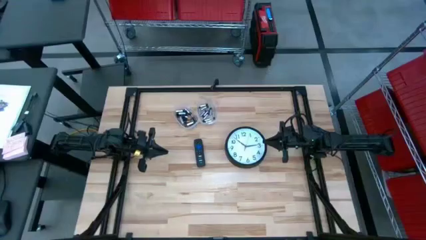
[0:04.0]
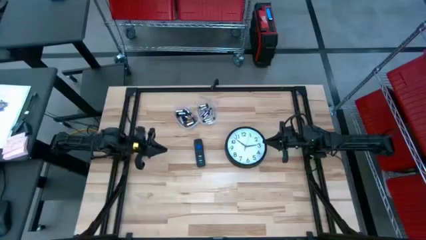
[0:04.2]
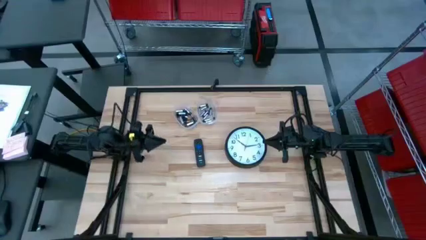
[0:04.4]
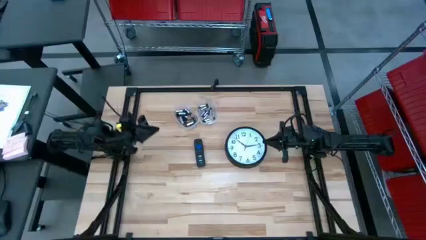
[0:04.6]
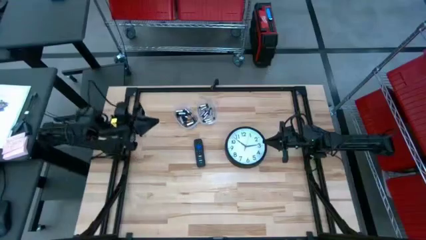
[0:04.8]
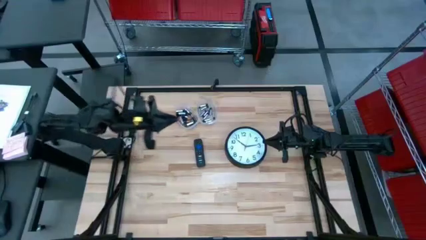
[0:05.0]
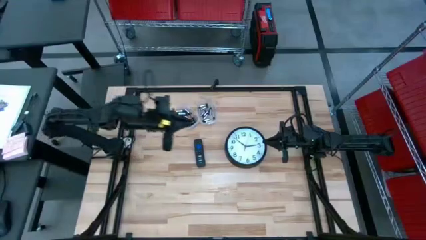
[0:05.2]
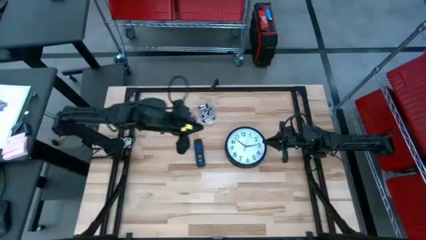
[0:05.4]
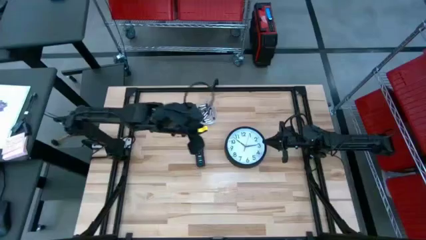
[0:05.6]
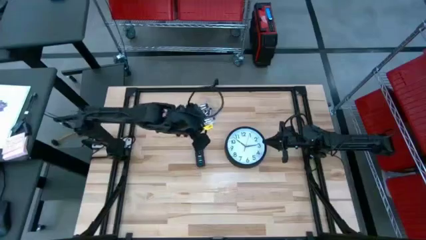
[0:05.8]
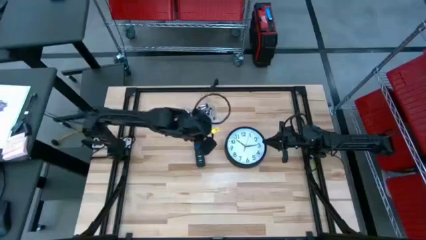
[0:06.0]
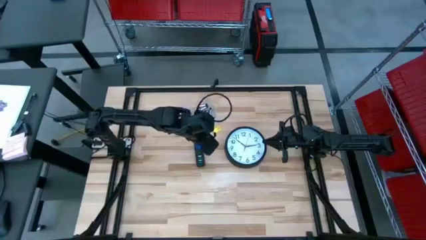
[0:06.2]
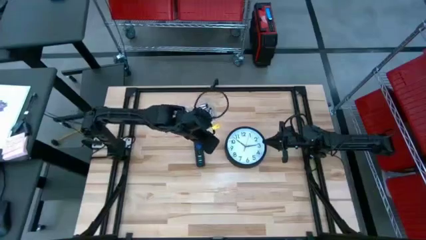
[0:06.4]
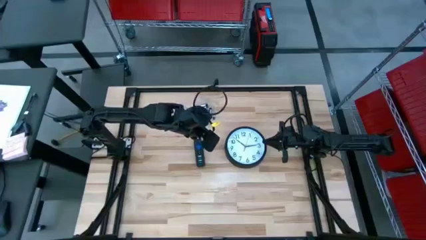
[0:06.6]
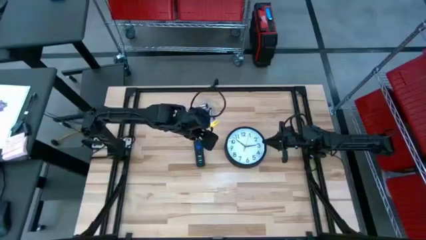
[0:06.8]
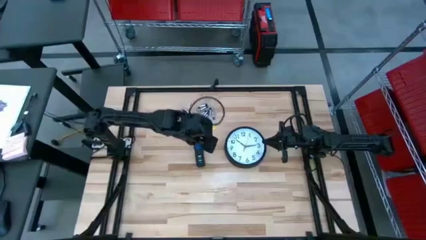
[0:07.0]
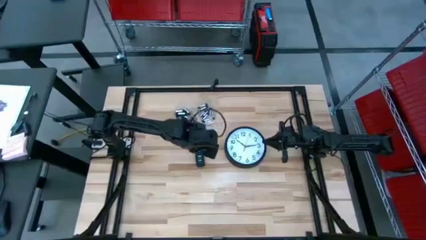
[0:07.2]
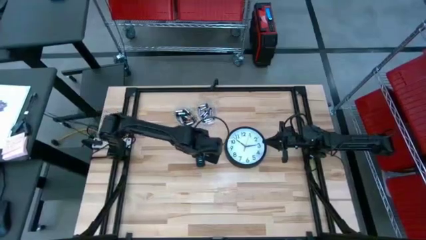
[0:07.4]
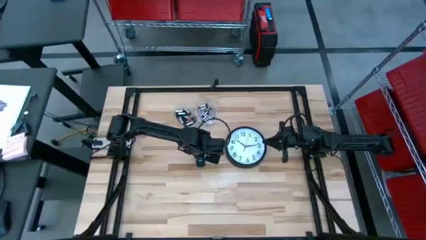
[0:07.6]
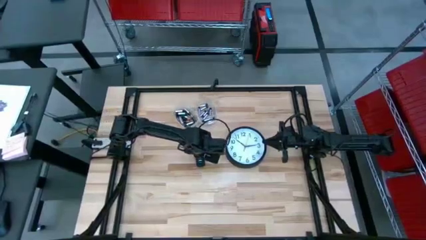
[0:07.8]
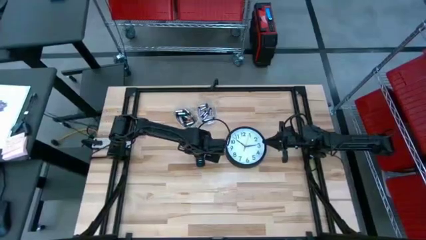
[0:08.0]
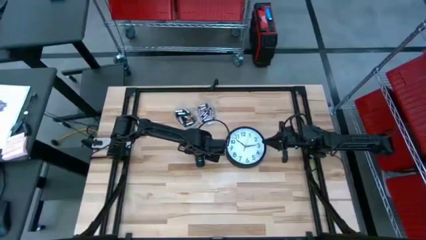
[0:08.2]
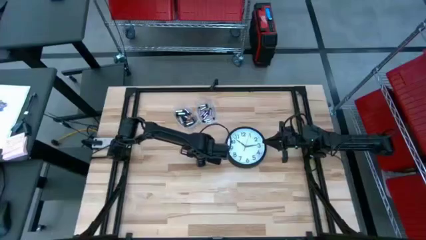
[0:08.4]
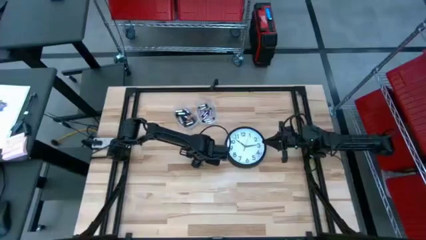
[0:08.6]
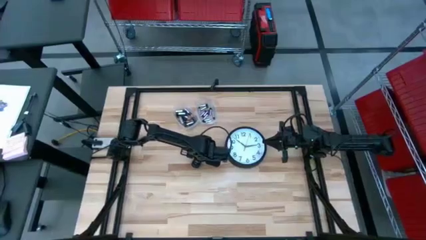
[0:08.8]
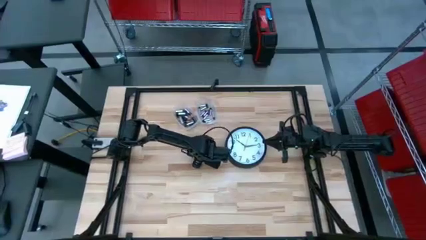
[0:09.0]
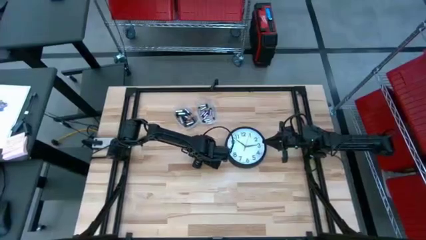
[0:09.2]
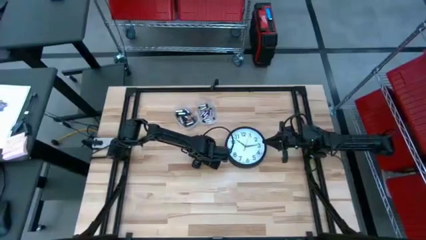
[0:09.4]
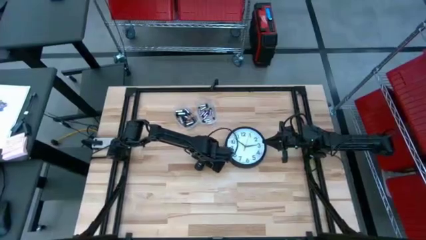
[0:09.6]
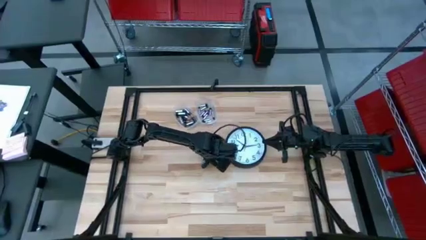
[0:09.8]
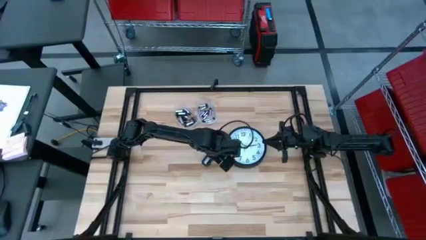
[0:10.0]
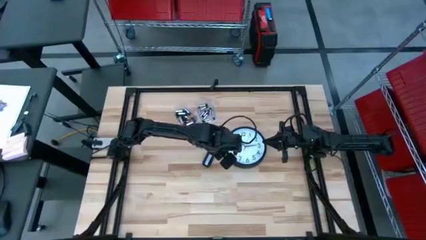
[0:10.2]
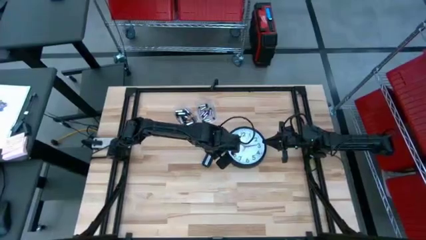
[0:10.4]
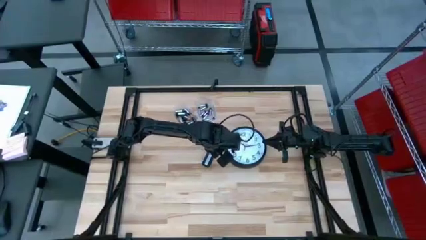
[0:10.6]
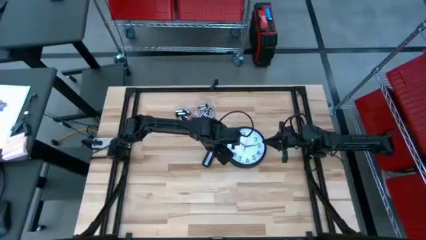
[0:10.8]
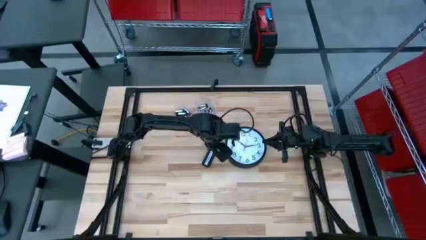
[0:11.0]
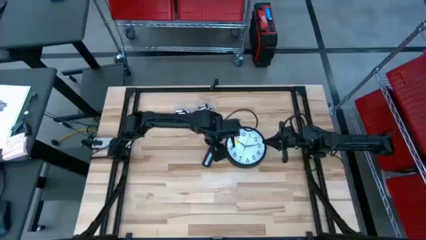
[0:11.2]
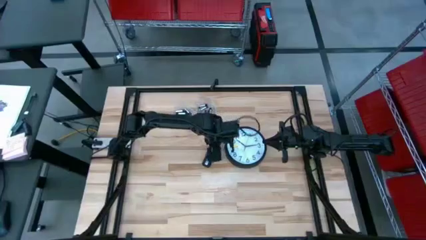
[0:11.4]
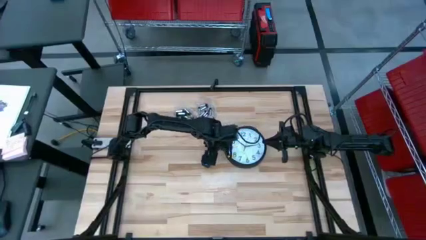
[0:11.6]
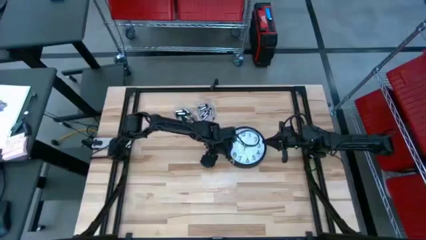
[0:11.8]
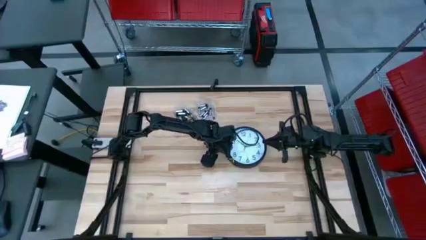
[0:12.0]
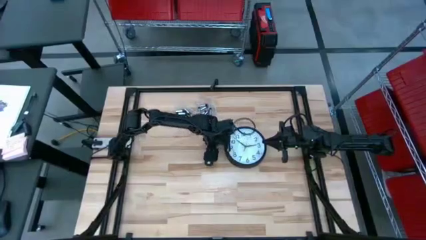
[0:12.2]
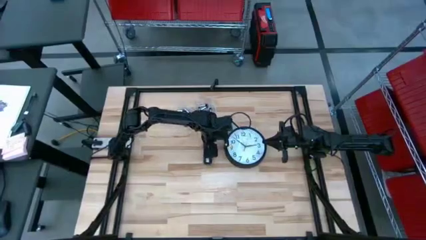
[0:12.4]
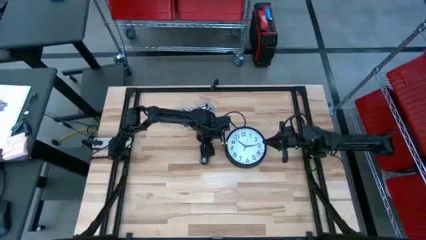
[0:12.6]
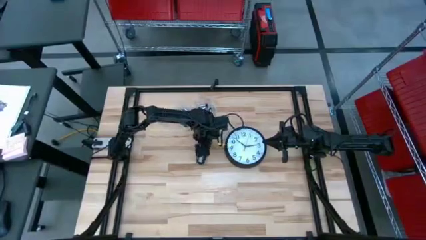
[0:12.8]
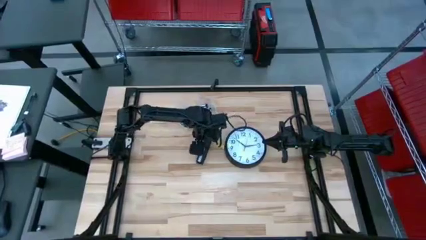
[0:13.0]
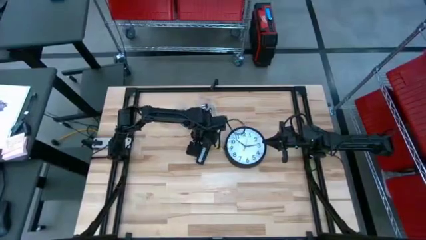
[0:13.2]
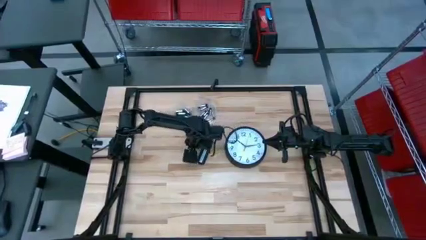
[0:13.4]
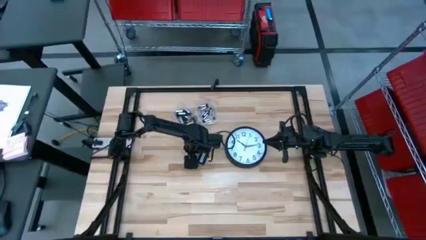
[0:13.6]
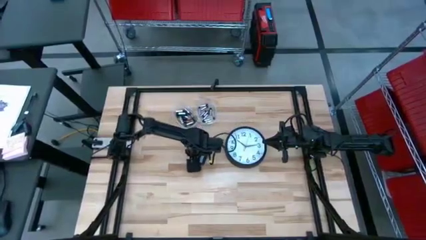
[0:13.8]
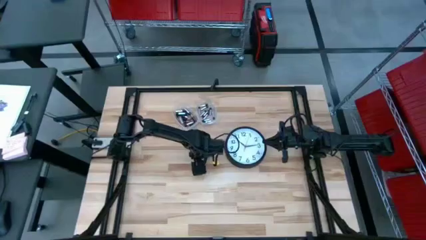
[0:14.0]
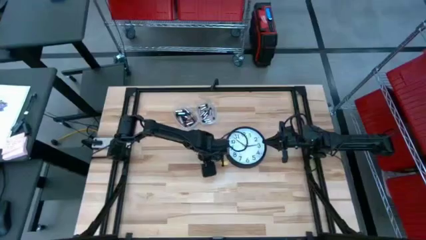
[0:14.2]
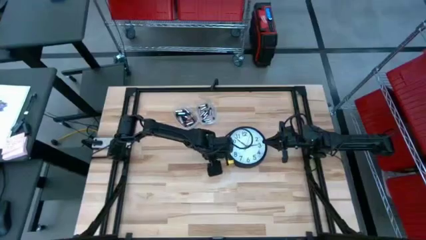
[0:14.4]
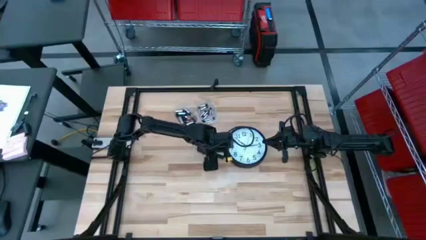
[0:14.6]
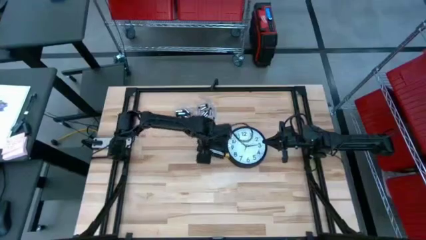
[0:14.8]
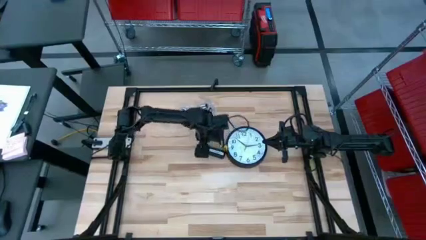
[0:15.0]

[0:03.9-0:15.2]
Task: Insert battery
Open the remote battery cover
